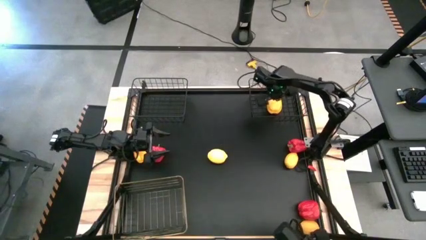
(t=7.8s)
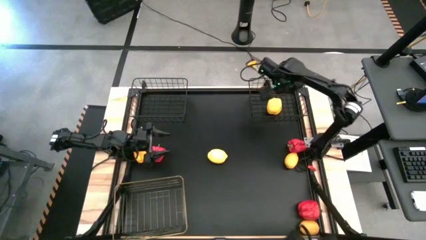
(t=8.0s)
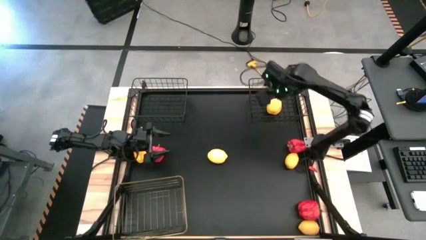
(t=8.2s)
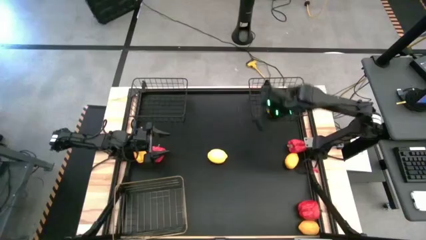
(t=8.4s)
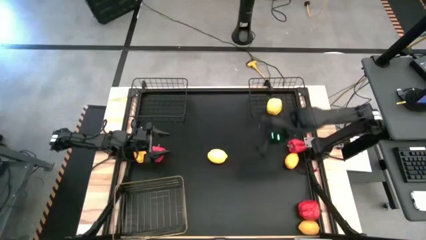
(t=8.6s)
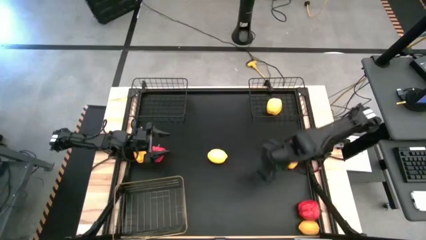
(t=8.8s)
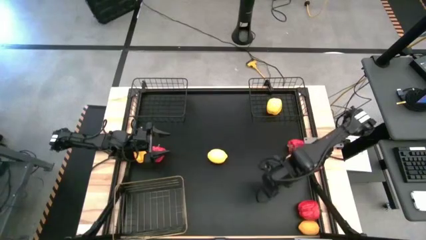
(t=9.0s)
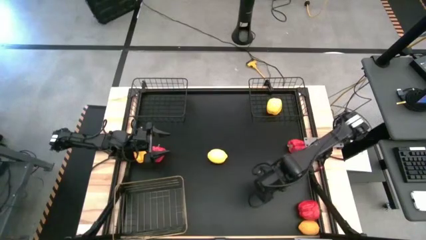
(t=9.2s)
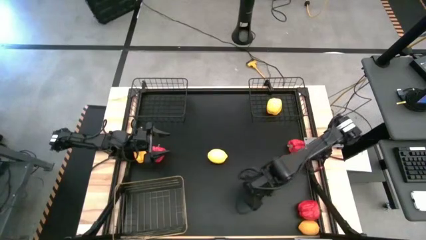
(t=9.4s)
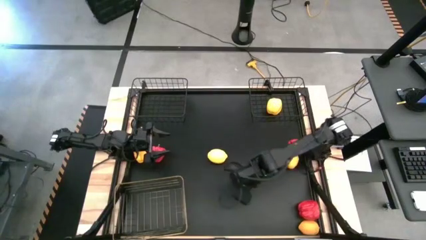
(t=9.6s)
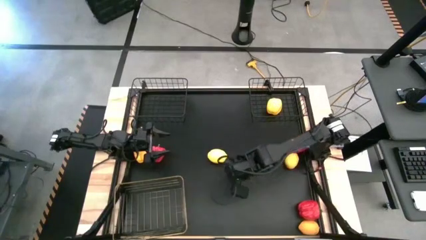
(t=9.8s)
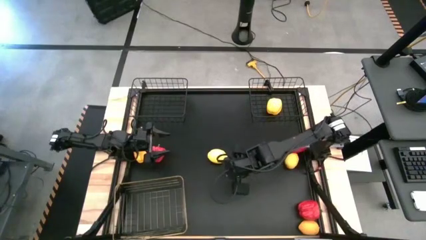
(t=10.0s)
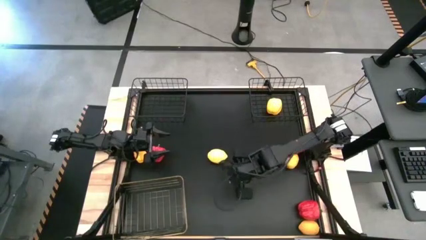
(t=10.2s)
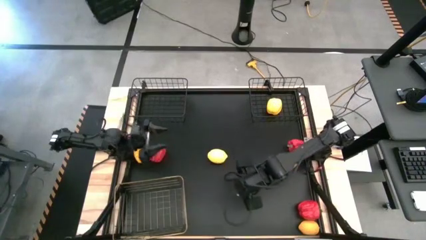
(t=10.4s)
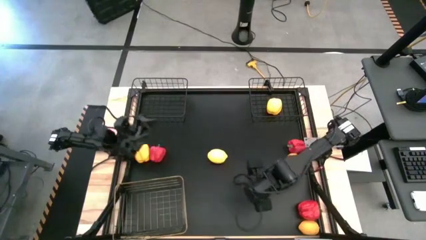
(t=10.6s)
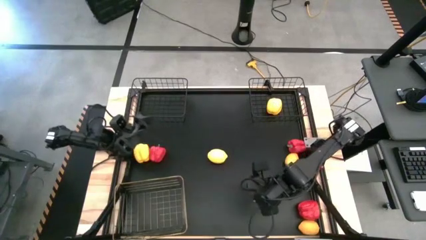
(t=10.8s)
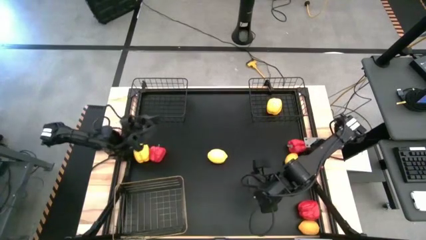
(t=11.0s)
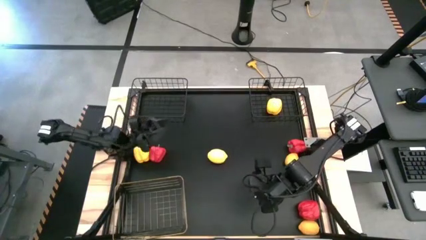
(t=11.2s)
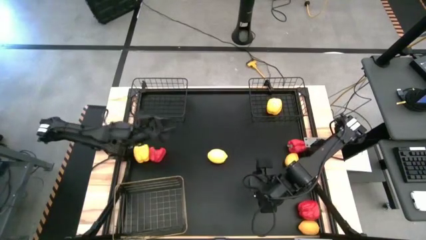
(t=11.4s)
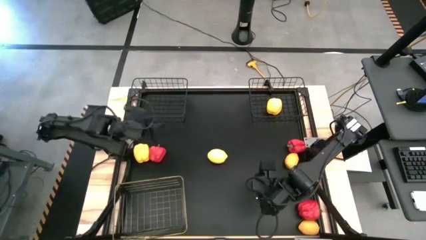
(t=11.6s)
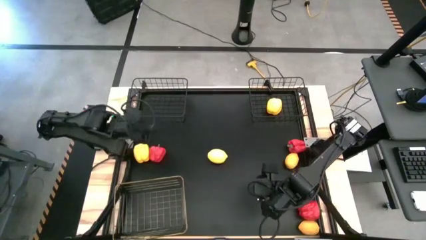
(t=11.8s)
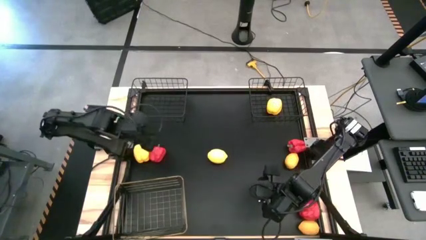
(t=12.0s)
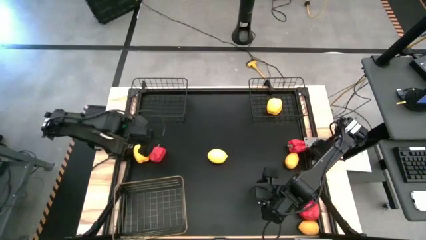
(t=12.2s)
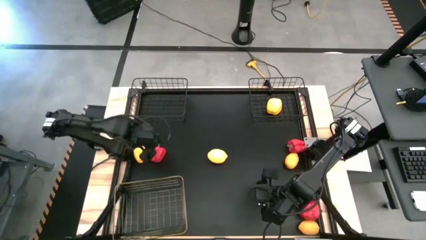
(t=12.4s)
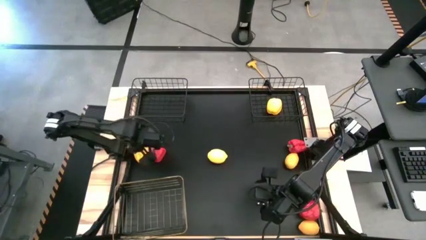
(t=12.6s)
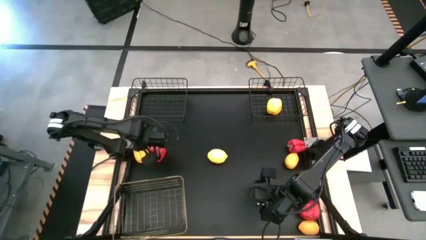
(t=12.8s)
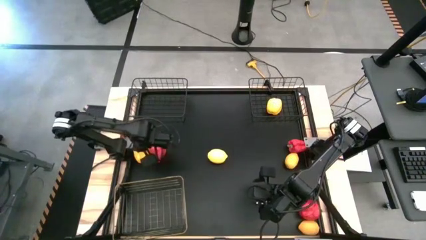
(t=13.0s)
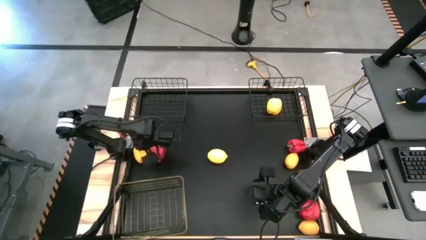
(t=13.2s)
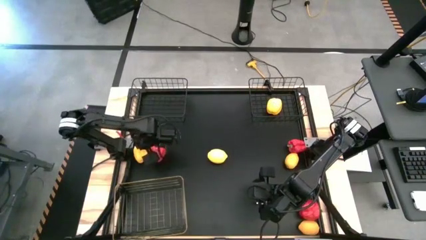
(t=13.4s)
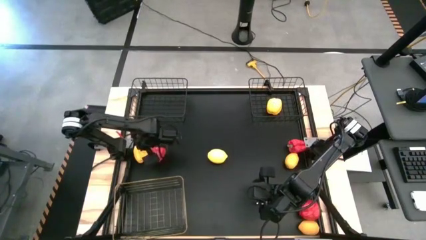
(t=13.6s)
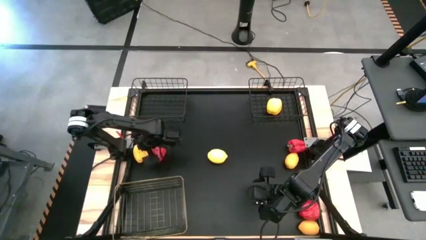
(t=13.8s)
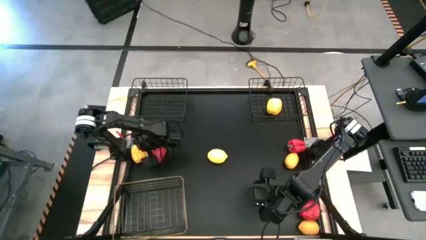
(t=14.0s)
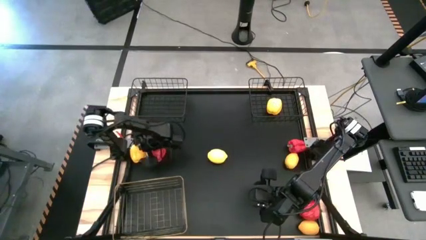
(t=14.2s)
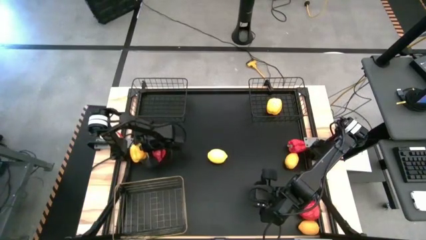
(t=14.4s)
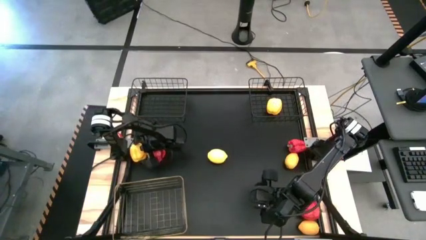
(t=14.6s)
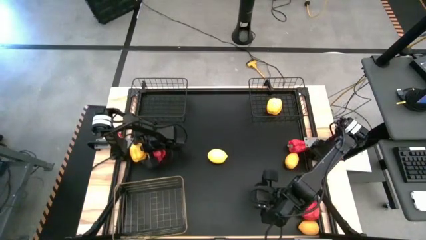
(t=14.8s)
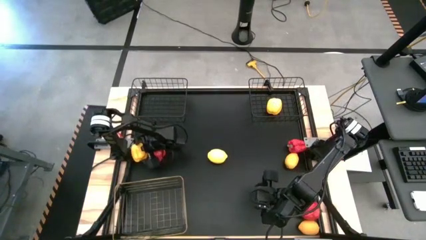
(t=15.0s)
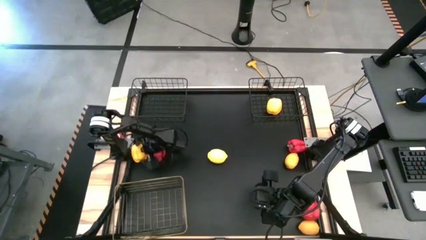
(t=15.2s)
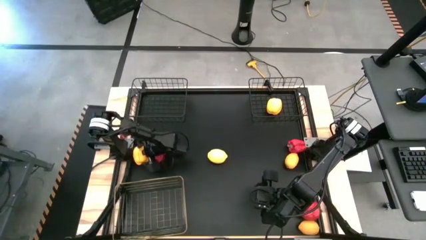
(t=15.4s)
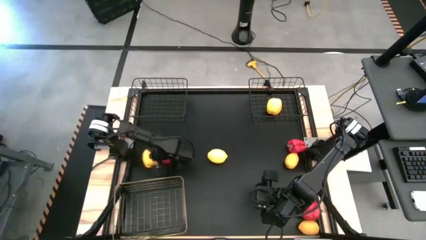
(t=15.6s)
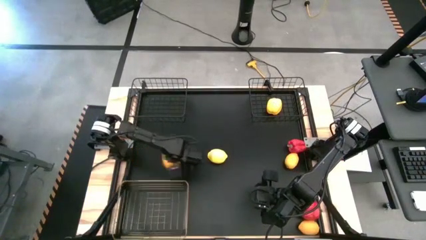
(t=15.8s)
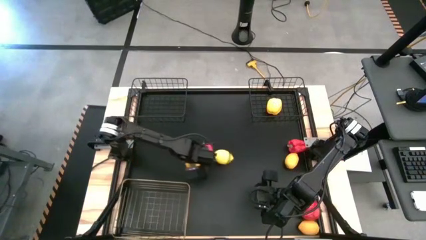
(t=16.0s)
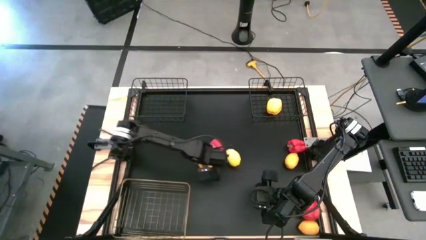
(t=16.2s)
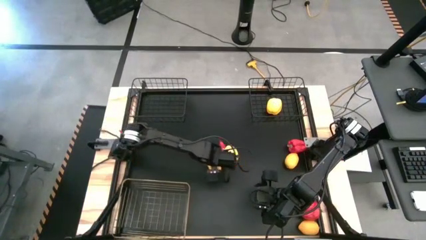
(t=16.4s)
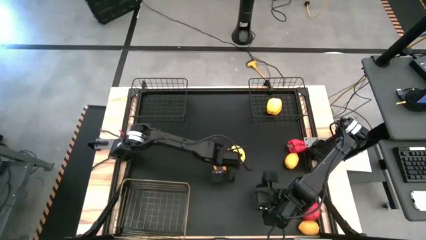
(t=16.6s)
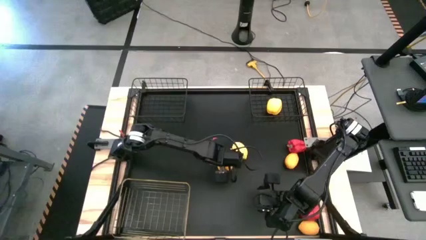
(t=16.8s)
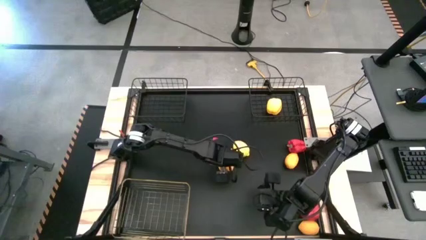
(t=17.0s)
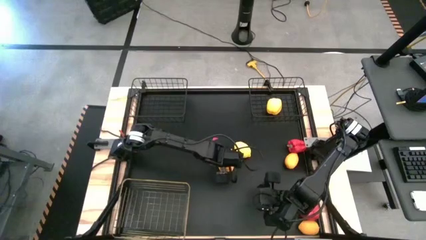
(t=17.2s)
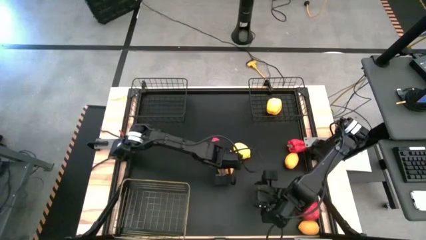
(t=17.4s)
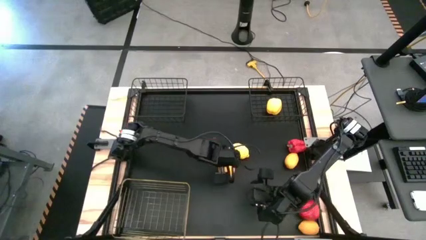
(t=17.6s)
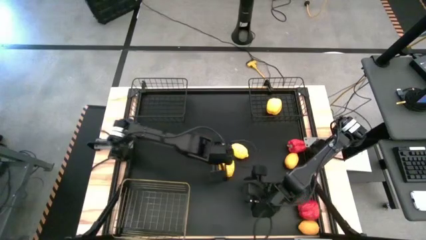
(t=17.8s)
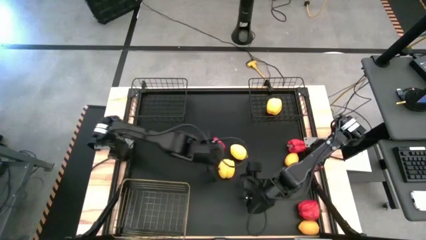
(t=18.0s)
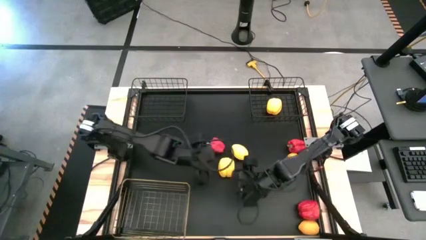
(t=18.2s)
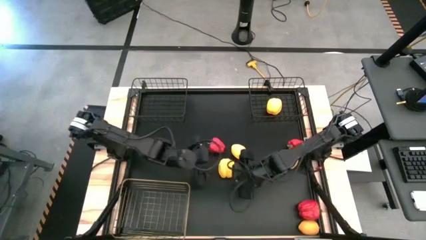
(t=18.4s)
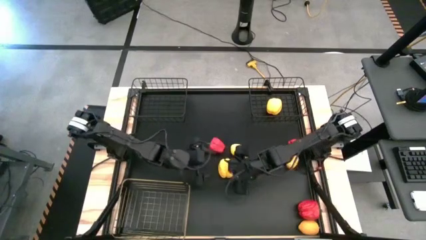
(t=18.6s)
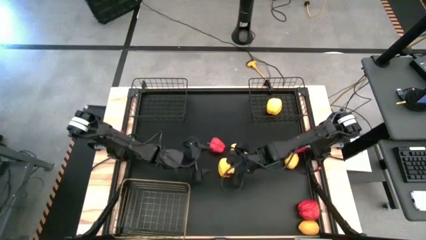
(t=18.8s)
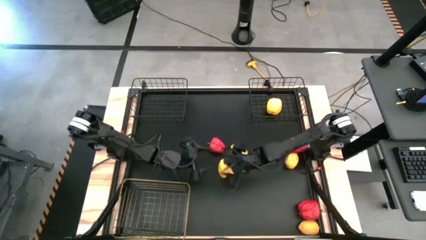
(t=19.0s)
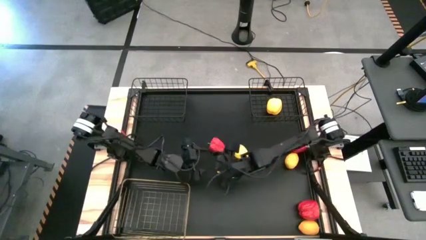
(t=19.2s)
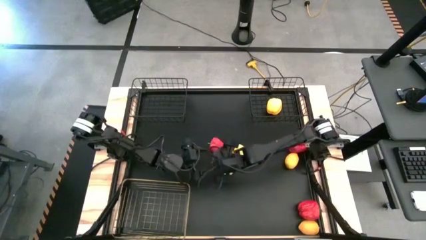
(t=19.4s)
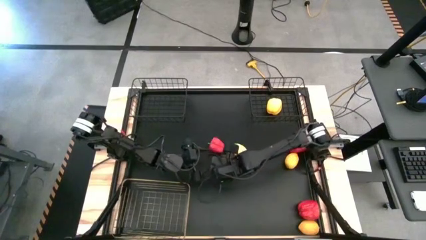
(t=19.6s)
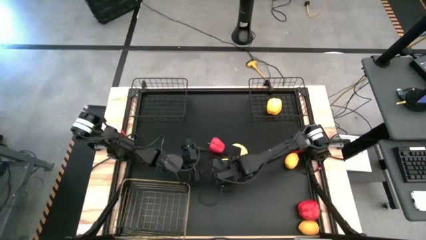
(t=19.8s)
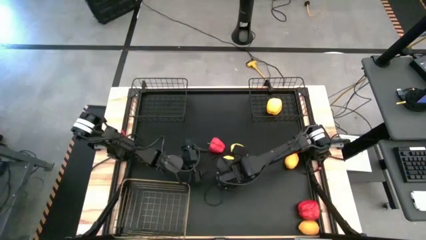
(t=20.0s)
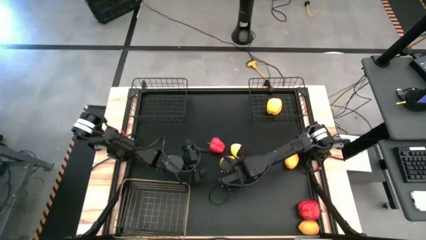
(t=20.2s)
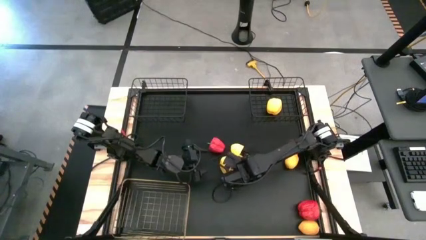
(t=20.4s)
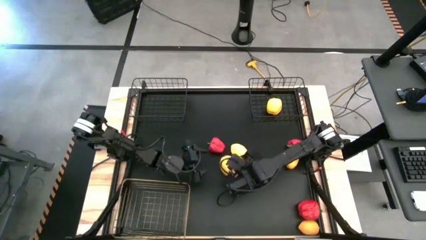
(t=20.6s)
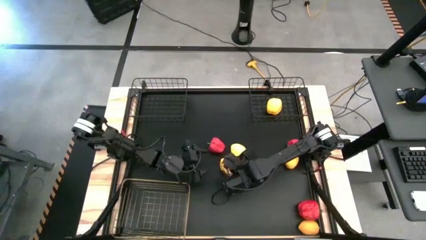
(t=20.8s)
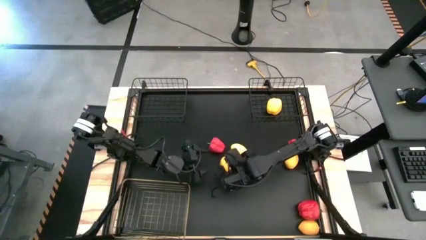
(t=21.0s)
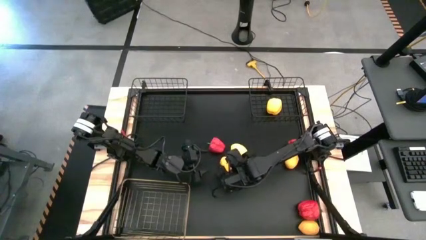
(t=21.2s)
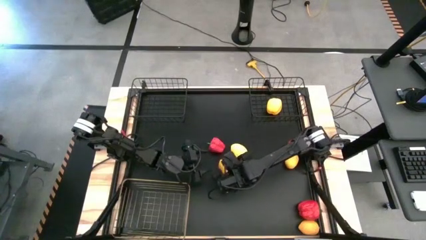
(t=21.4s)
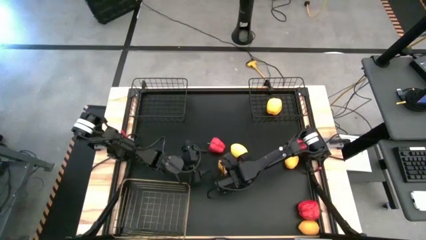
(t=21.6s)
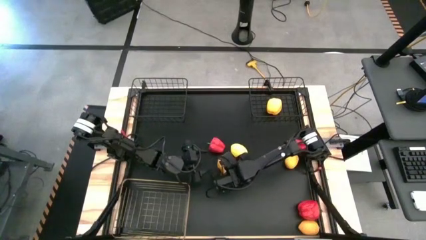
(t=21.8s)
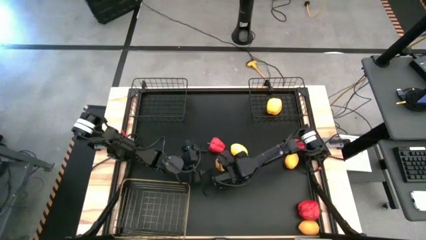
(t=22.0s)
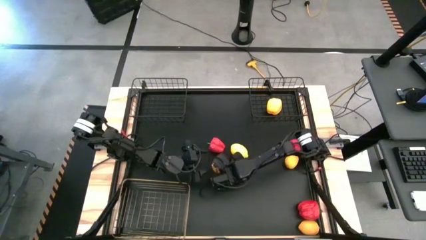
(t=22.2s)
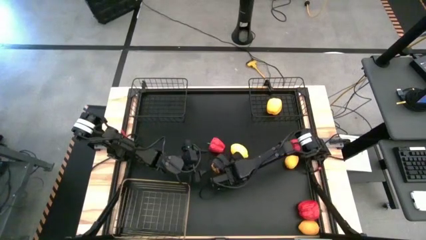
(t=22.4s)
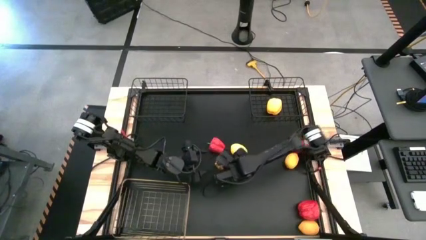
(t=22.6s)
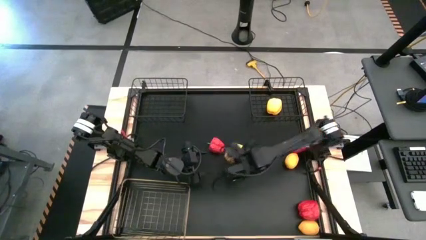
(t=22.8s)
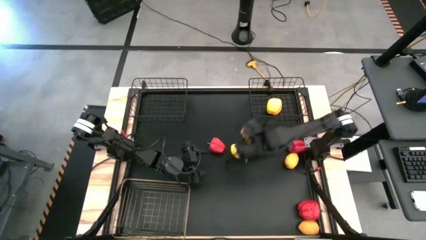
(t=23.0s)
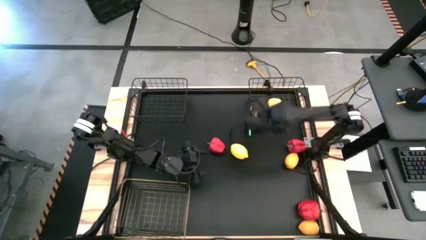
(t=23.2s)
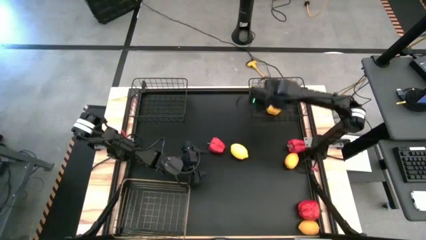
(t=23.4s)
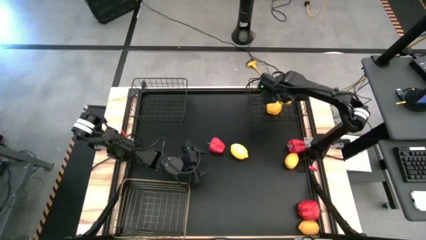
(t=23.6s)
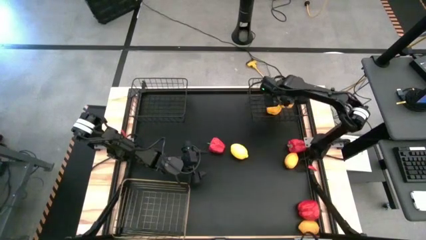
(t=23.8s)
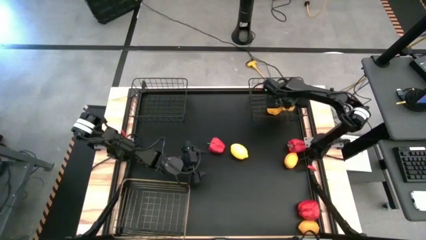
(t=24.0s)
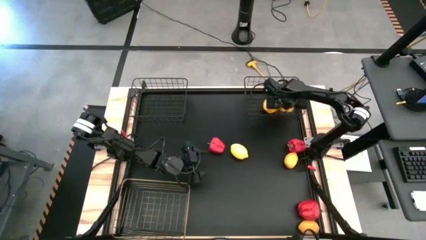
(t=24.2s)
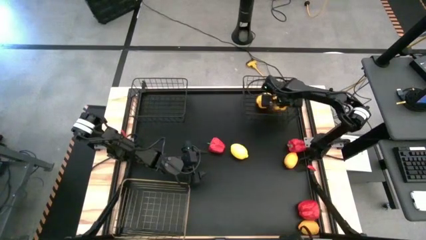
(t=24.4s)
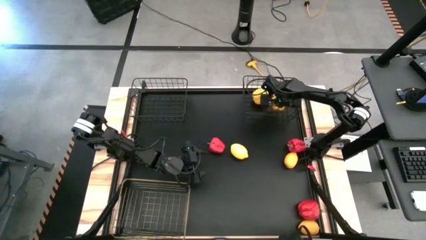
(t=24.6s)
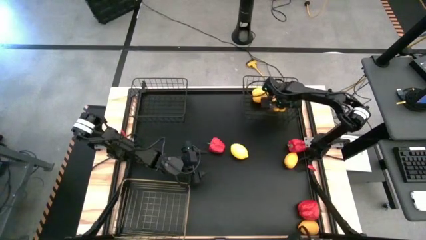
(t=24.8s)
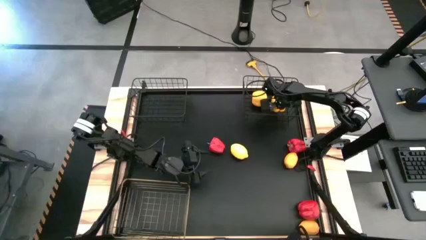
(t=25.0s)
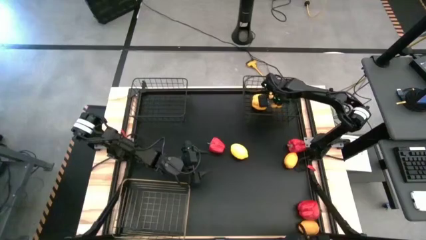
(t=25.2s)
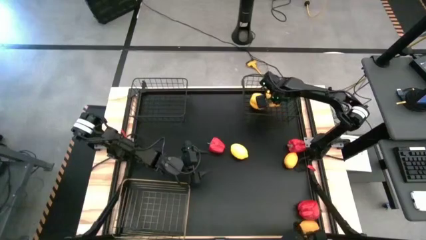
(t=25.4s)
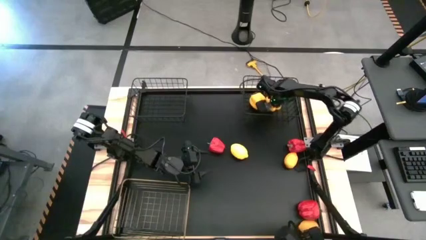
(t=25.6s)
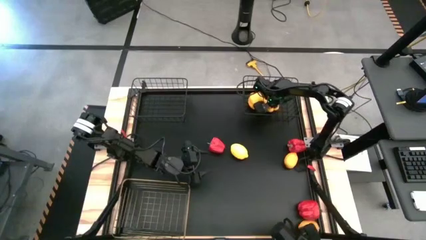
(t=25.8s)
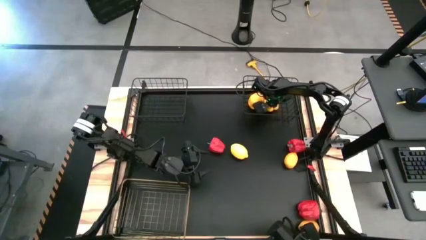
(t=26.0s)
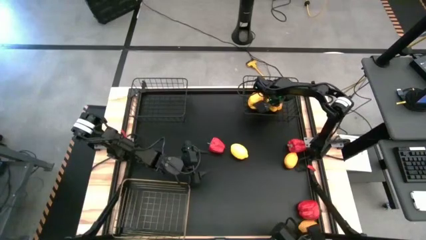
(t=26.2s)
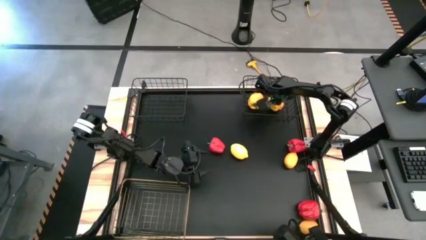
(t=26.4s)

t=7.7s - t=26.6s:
Task: Sort produce into baskets
Put the yellow bell pepper into the right black wire basket
